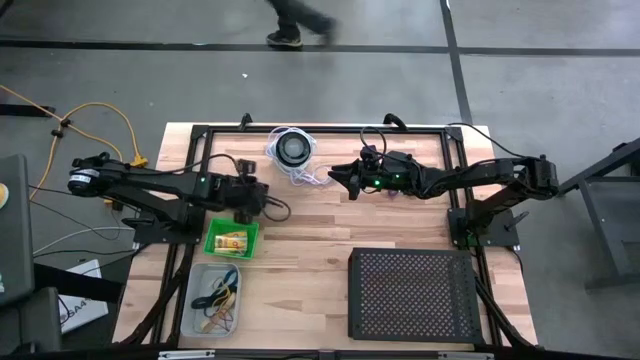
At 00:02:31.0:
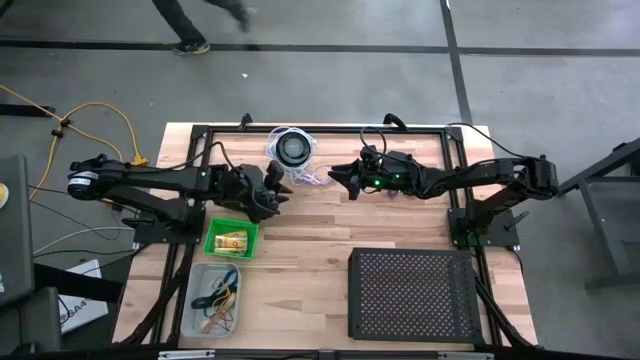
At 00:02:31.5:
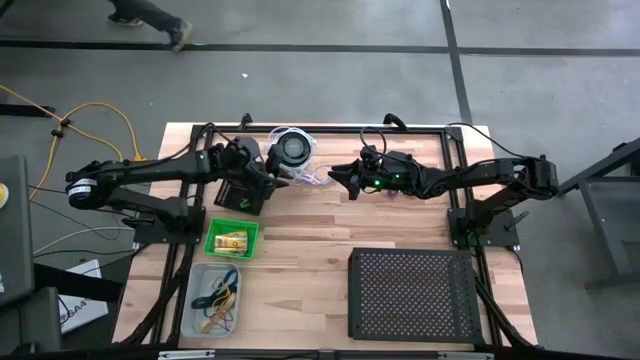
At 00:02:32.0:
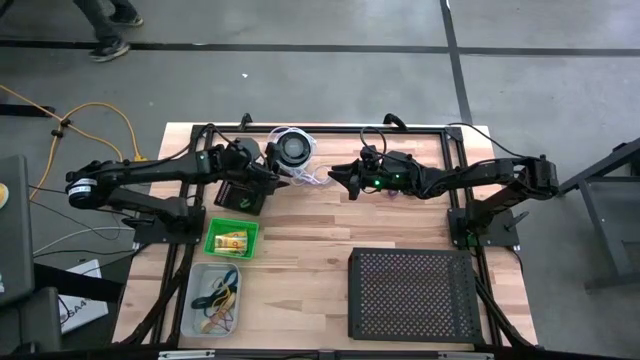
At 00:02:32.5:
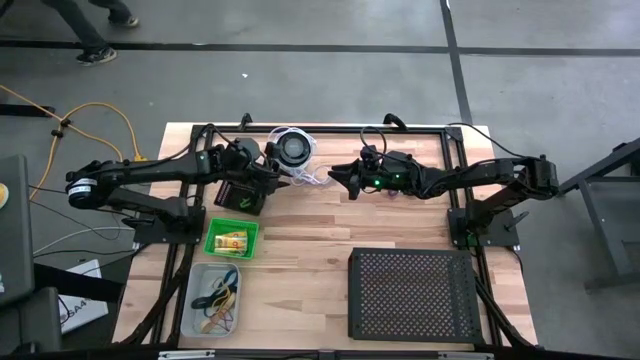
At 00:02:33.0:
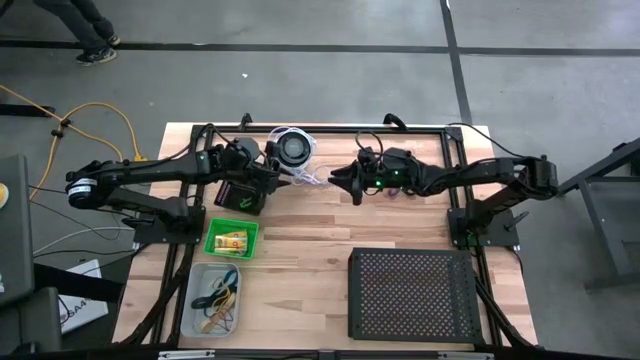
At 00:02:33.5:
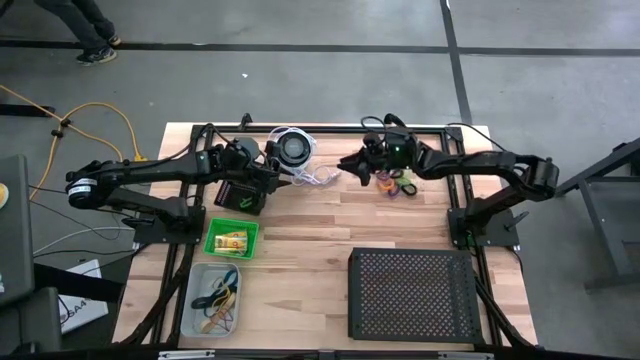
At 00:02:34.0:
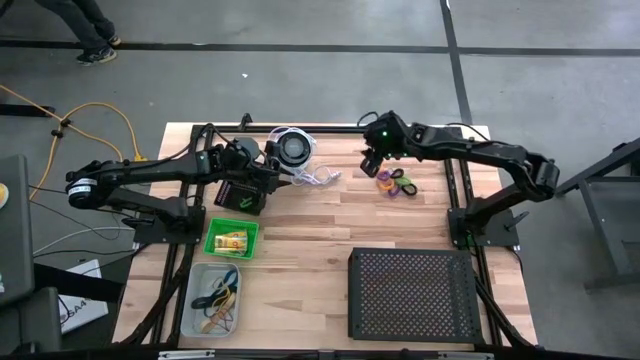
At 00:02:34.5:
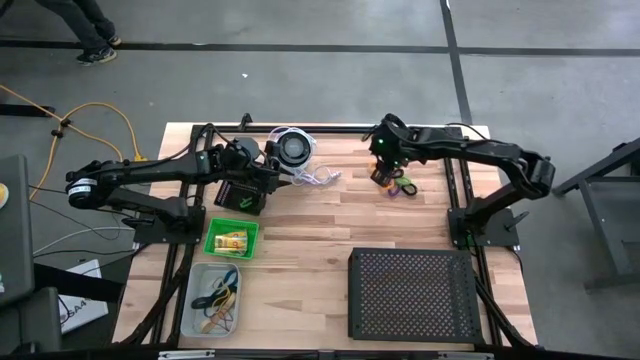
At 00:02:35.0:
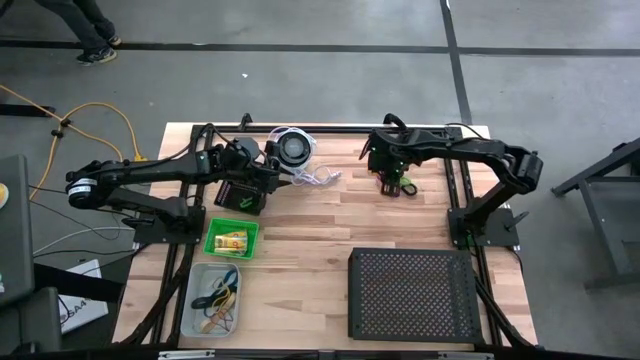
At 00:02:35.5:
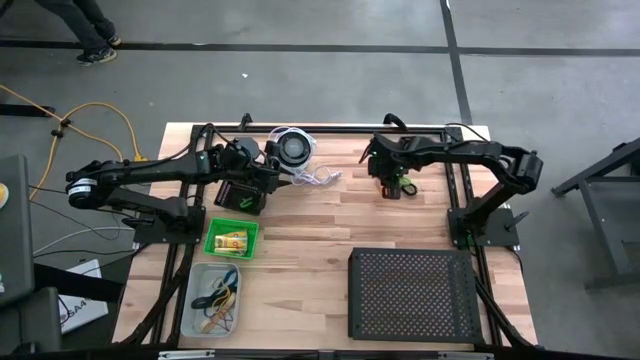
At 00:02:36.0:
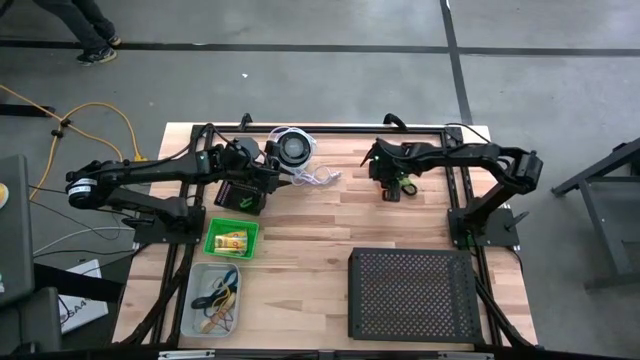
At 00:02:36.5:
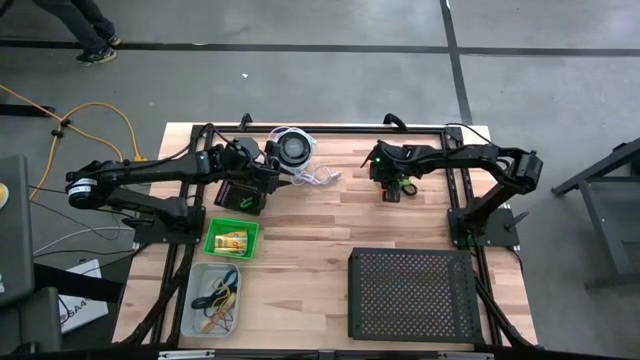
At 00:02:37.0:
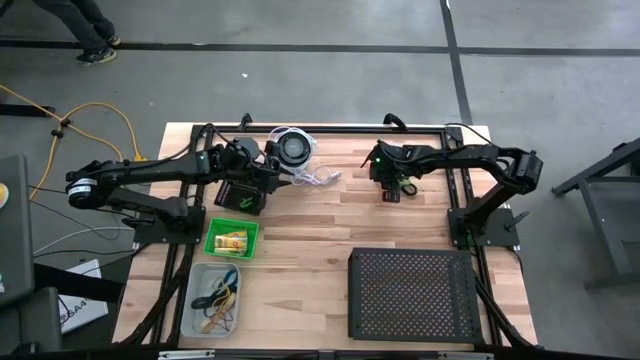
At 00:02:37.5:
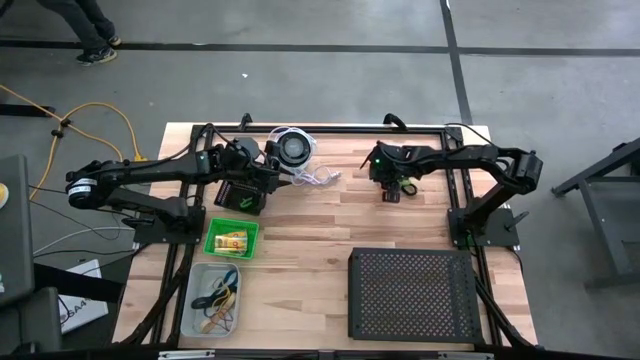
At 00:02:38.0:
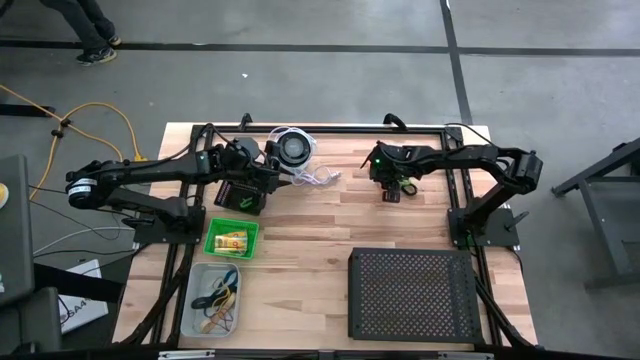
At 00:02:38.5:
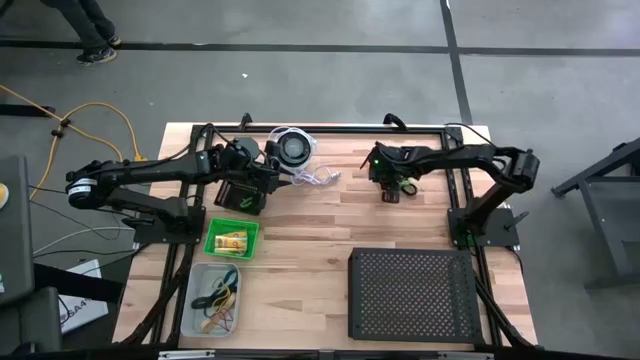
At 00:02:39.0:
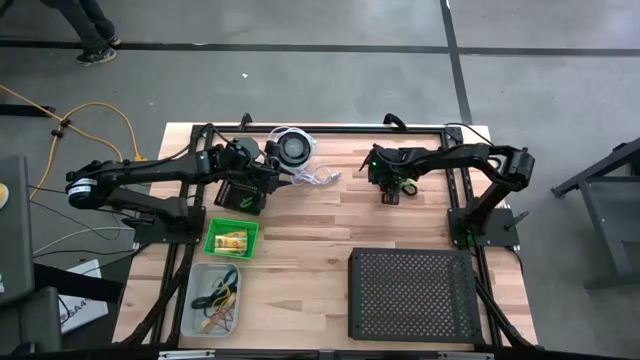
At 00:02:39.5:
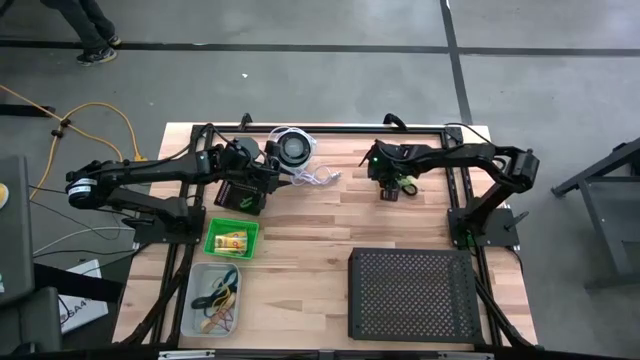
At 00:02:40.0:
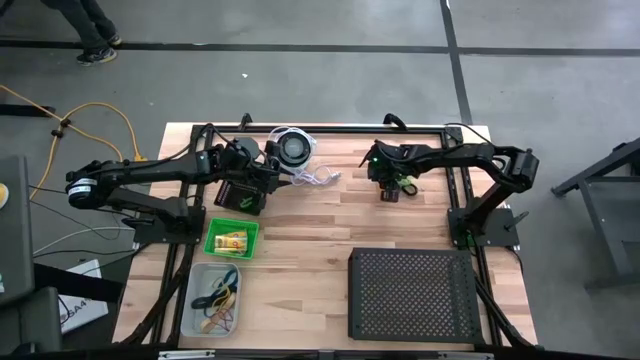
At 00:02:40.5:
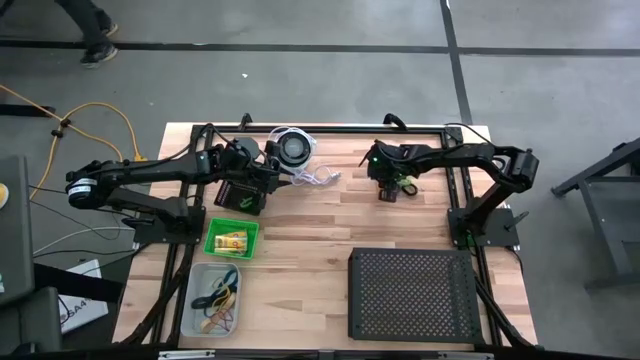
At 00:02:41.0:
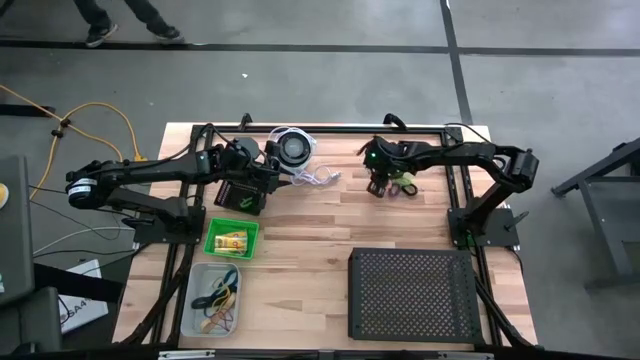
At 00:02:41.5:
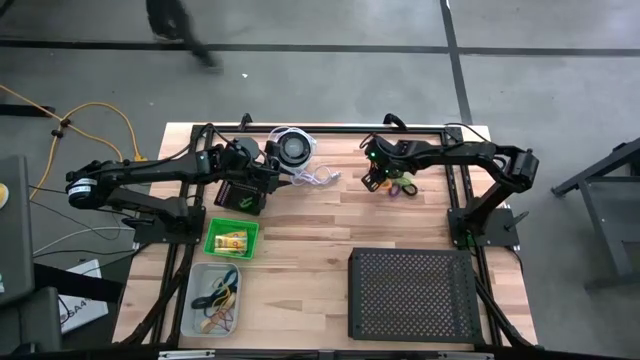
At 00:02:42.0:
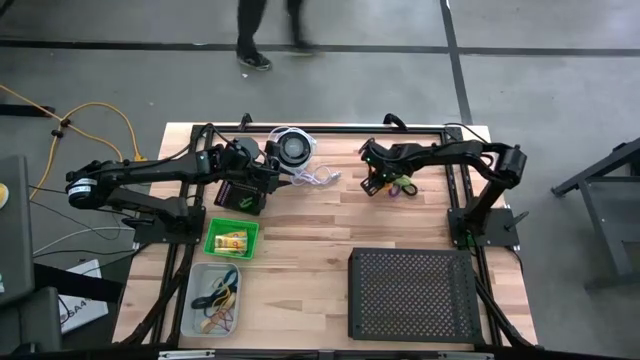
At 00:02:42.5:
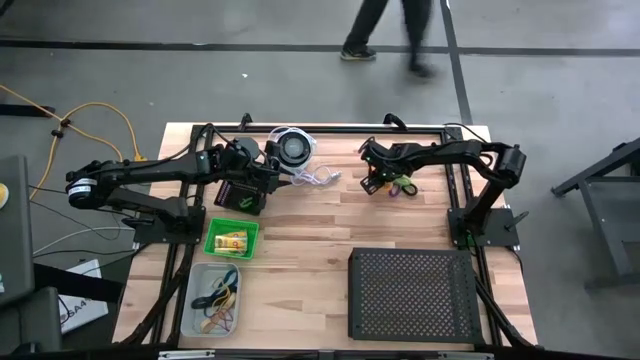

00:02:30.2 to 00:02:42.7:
Task: Pick & Place Office Desk Supplies
Put the purple coil keychain into the black bin

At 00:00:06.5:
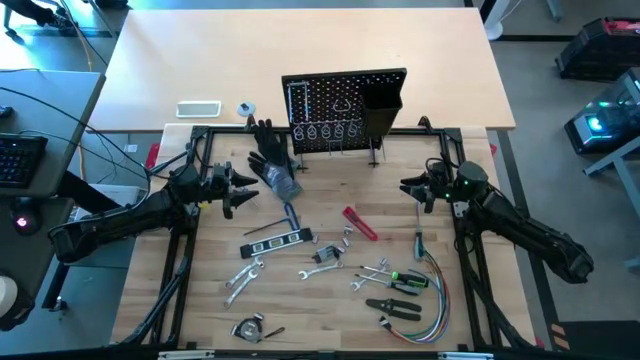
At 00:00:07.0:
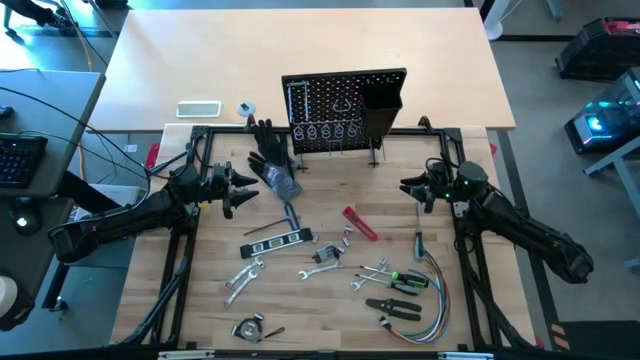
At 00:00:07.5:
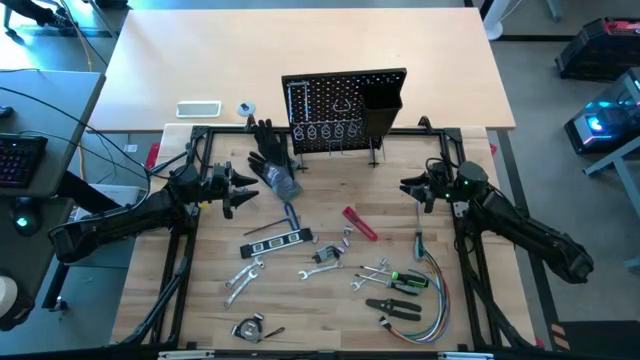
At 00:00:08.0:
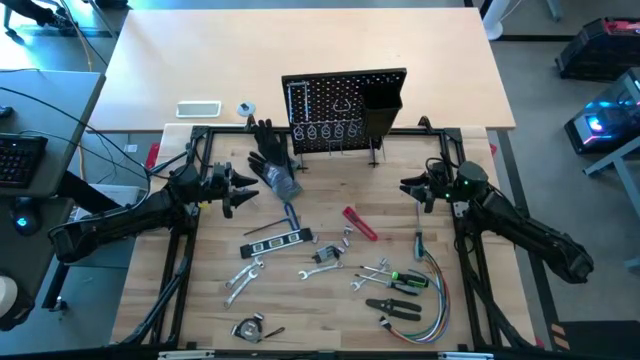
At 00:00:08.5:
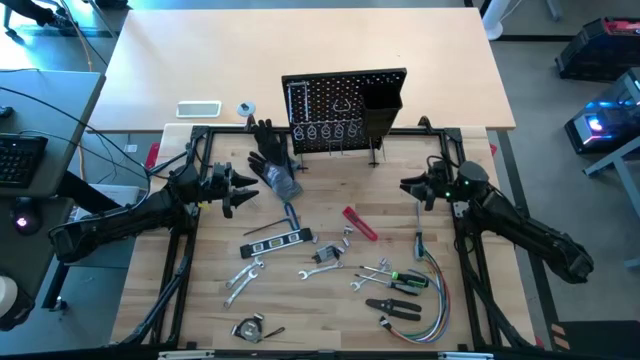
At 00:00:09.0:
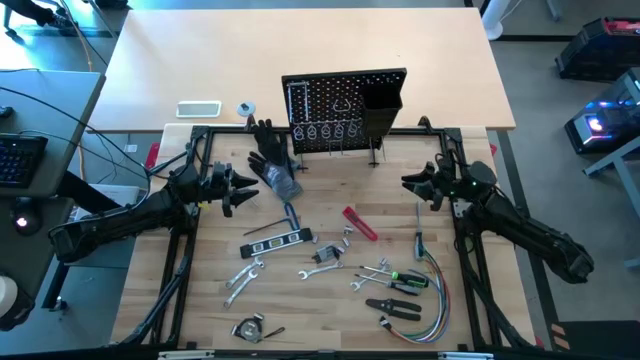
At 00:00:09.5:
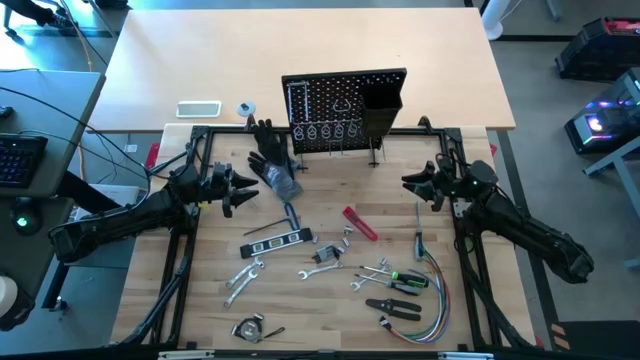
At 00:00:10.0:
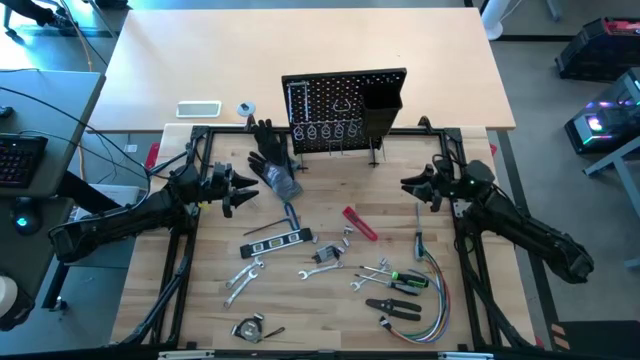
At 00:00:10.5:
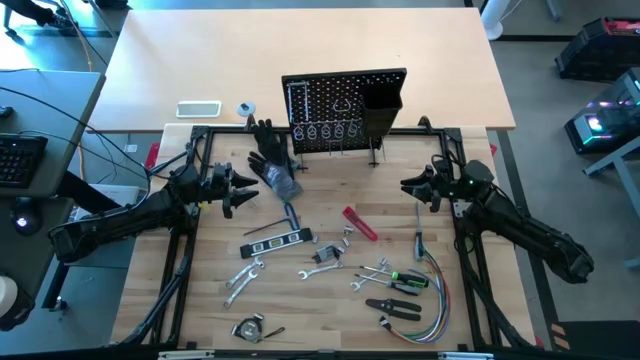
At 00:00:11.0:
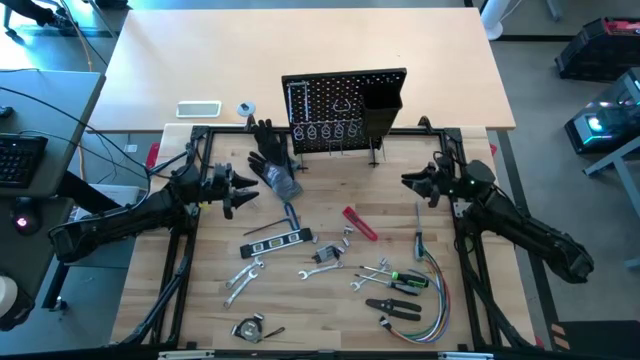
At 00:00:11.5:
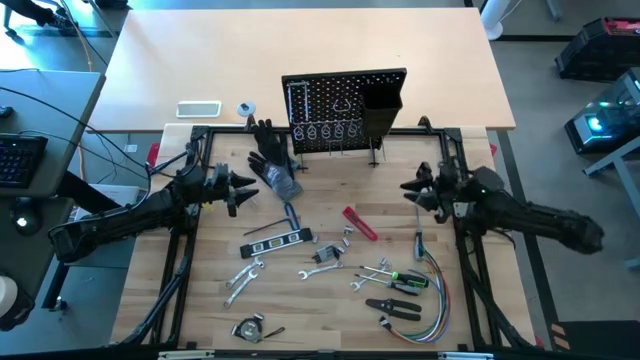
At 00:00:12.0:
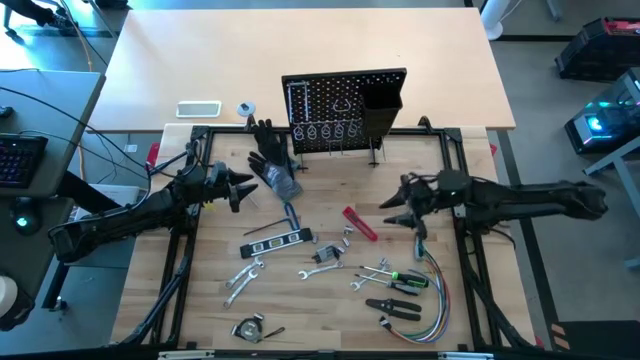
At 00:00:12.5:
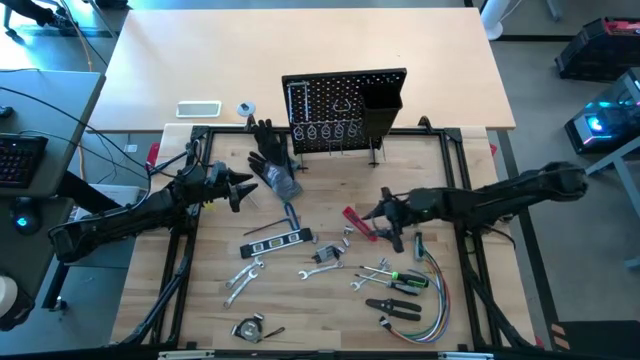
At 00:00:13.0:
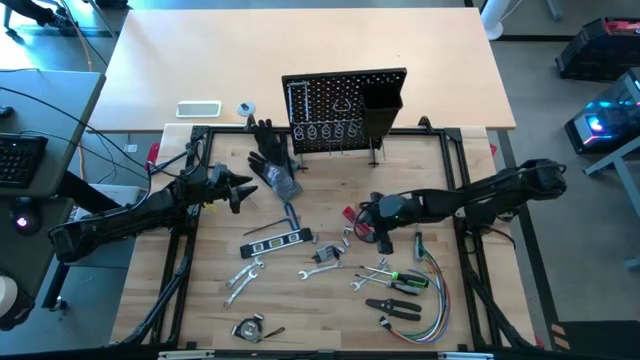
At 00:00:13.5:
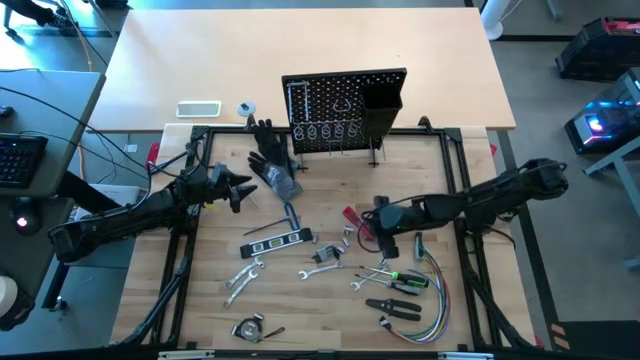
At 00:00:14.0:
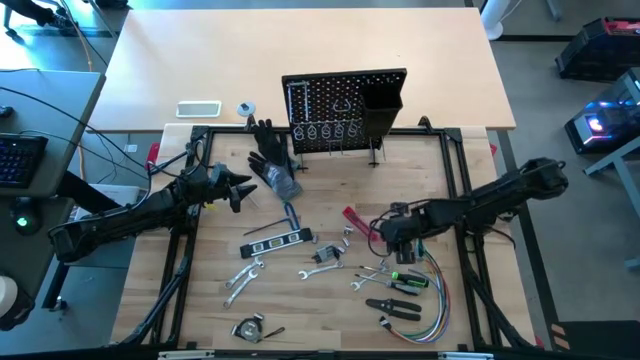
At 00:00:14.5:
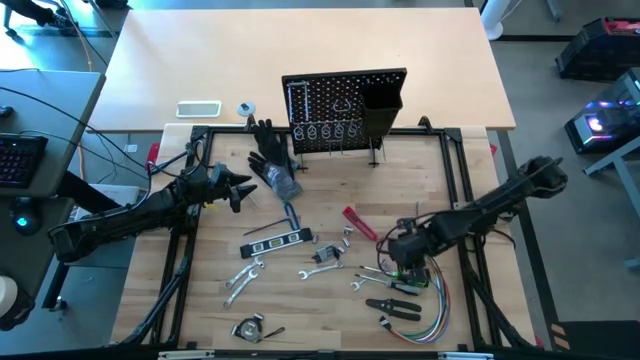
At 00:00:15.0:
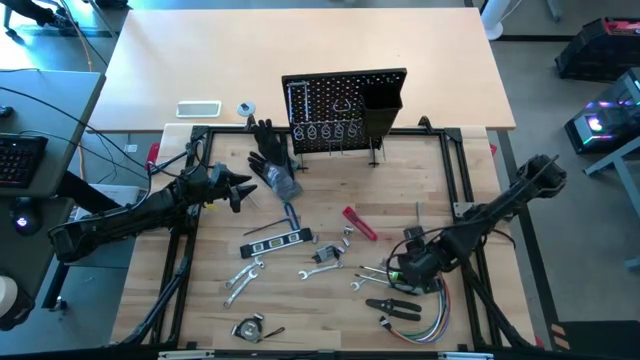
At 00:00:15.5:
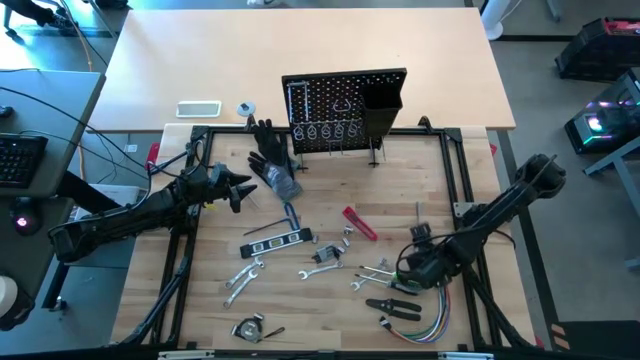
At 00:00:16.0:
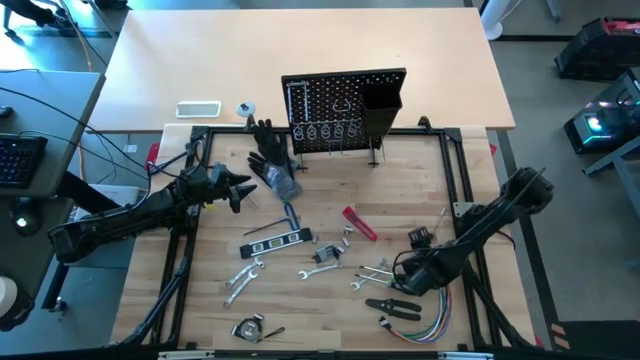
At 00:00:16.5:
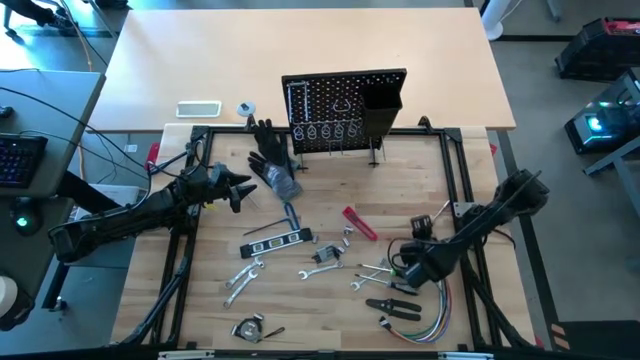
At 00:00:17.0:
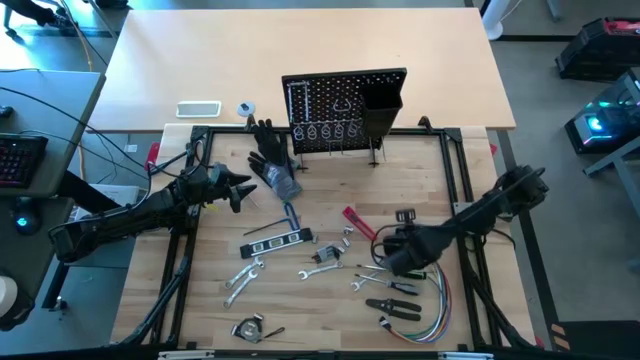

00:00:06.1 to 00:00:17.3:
Task: Hang tools onto peg board
Hang the top gray screwdriver on the pegboard
